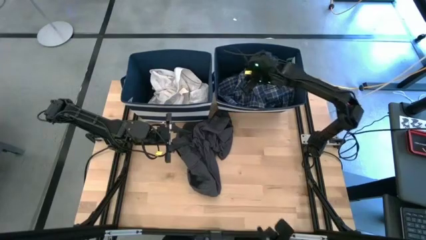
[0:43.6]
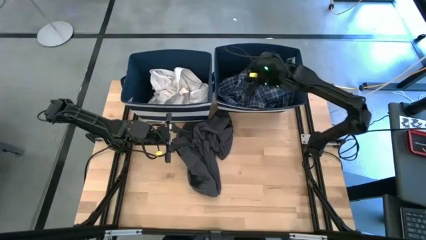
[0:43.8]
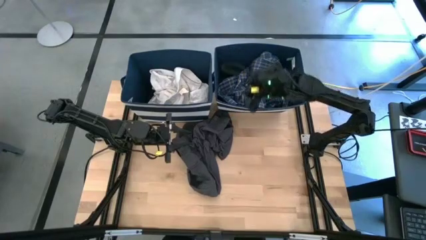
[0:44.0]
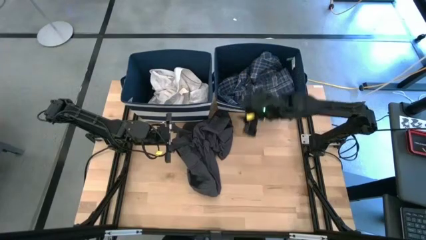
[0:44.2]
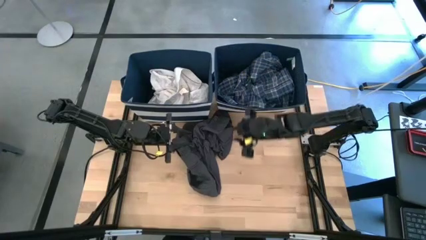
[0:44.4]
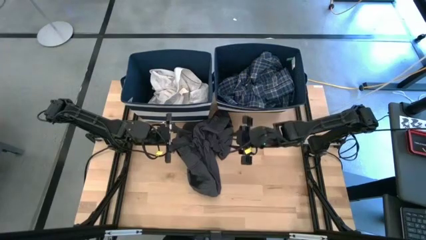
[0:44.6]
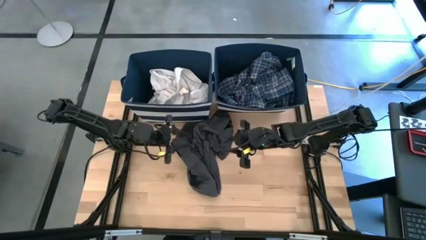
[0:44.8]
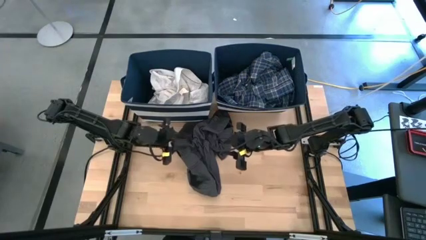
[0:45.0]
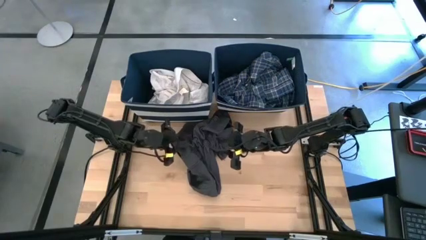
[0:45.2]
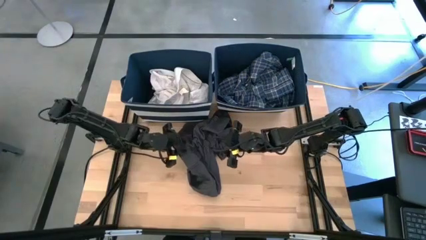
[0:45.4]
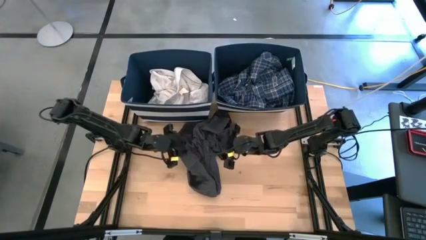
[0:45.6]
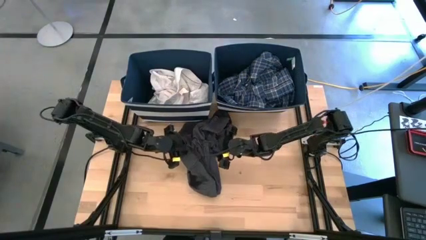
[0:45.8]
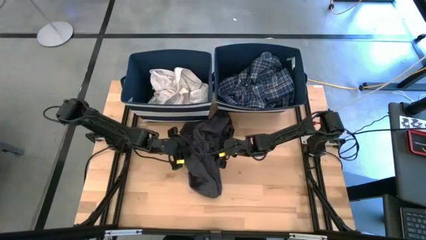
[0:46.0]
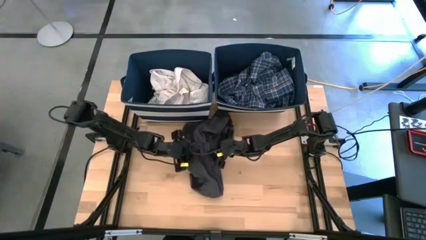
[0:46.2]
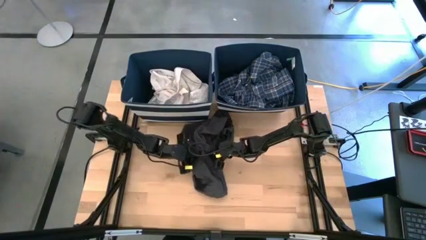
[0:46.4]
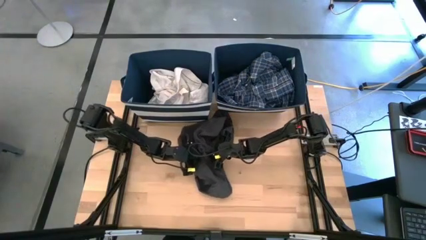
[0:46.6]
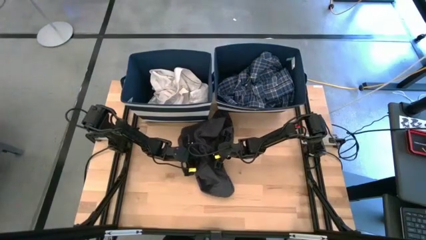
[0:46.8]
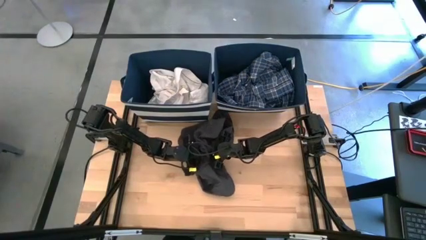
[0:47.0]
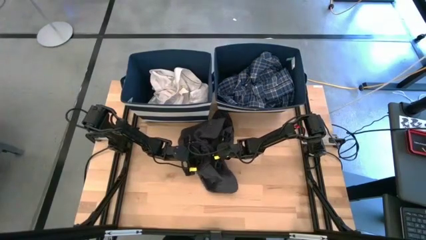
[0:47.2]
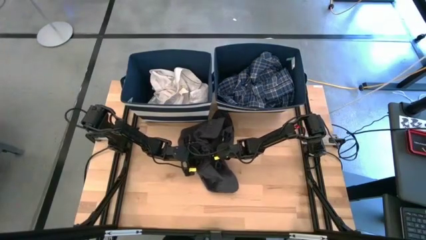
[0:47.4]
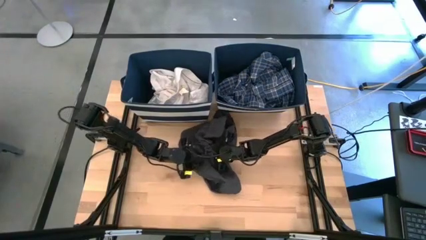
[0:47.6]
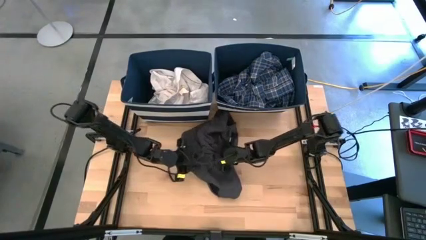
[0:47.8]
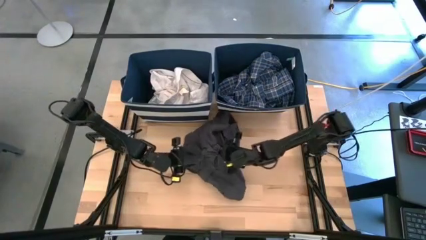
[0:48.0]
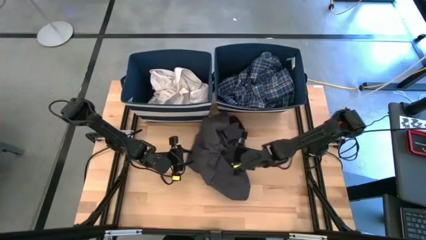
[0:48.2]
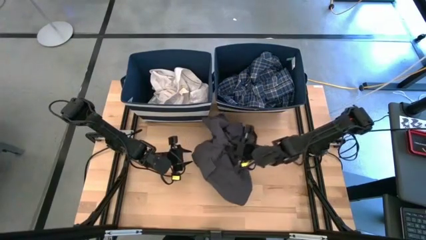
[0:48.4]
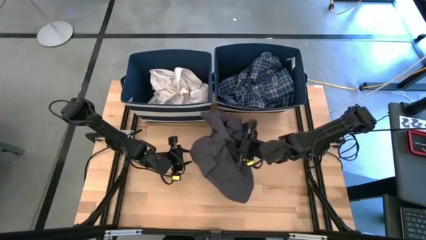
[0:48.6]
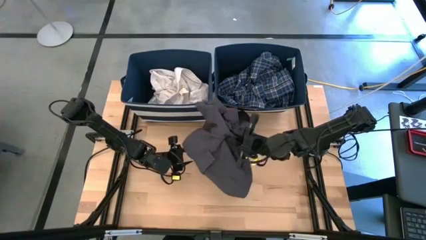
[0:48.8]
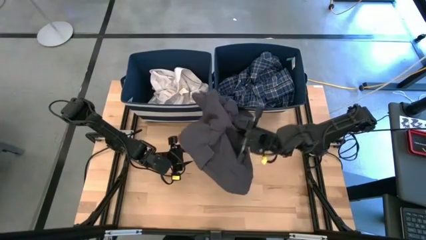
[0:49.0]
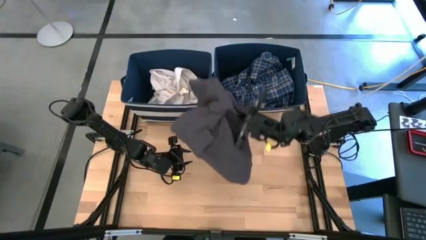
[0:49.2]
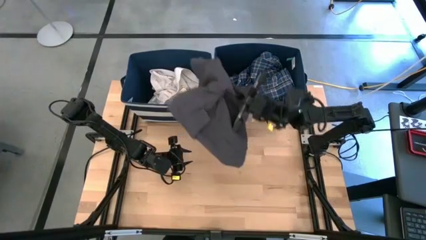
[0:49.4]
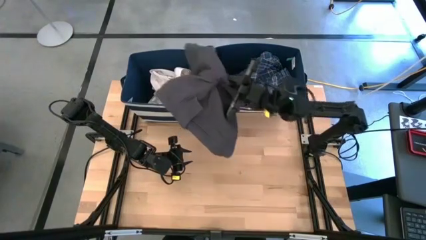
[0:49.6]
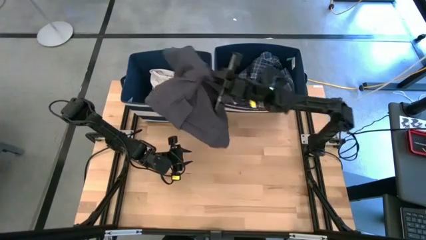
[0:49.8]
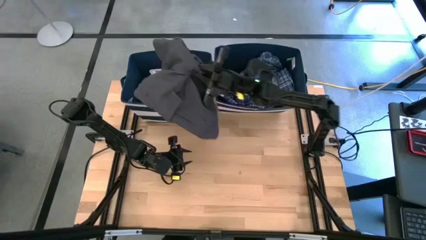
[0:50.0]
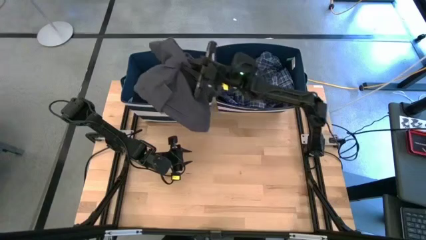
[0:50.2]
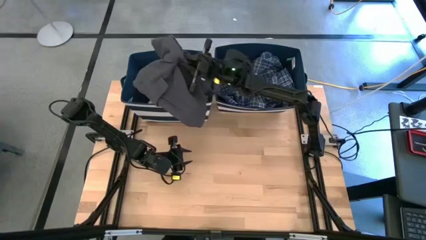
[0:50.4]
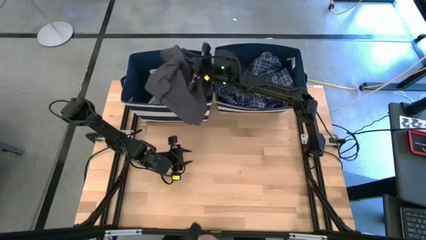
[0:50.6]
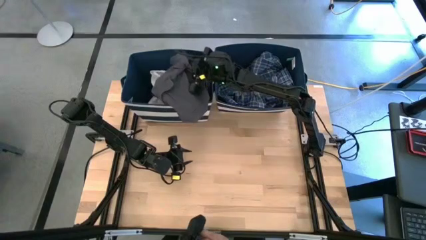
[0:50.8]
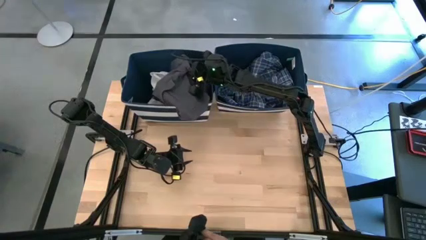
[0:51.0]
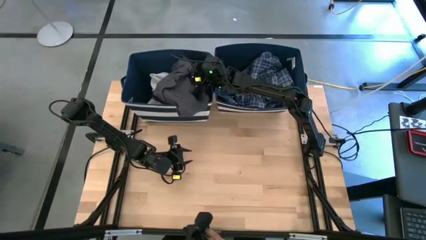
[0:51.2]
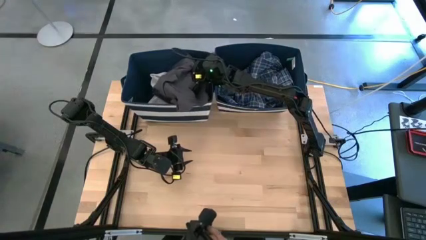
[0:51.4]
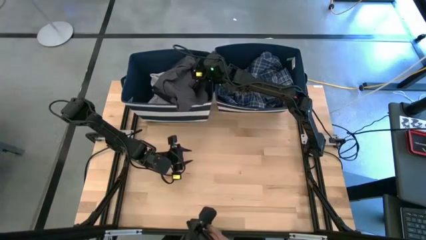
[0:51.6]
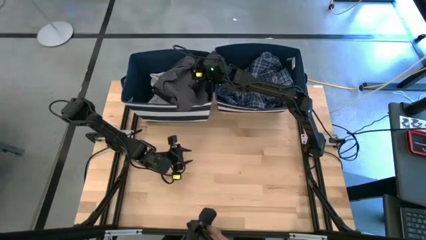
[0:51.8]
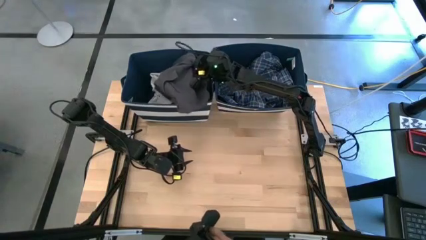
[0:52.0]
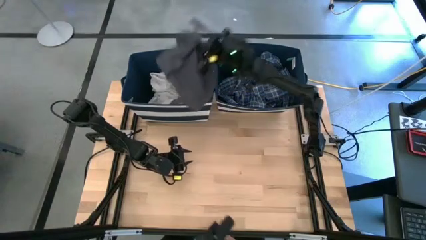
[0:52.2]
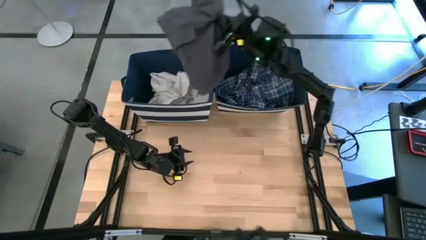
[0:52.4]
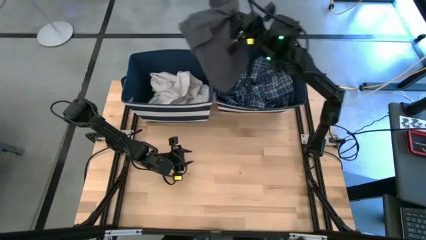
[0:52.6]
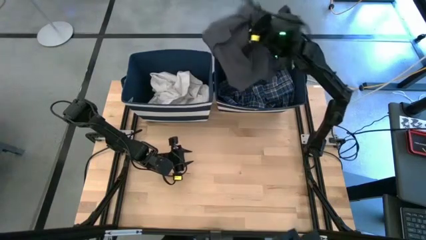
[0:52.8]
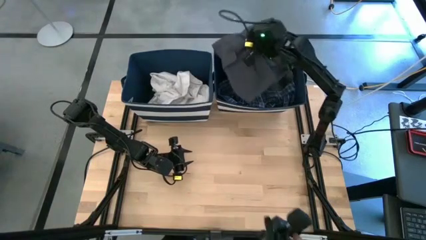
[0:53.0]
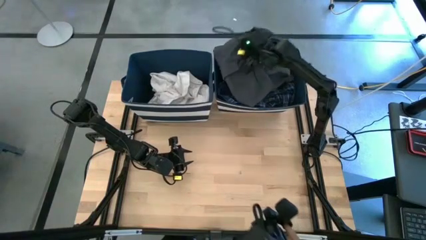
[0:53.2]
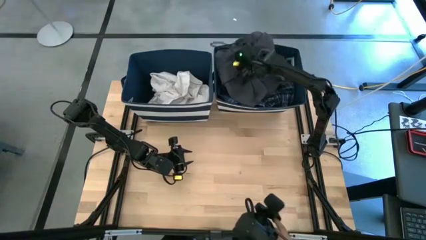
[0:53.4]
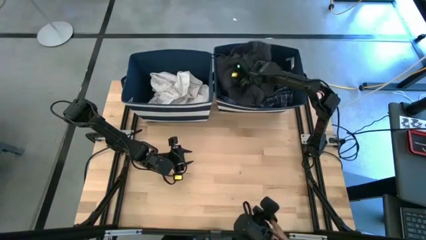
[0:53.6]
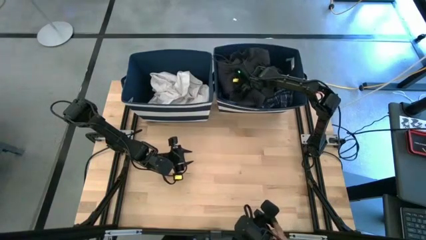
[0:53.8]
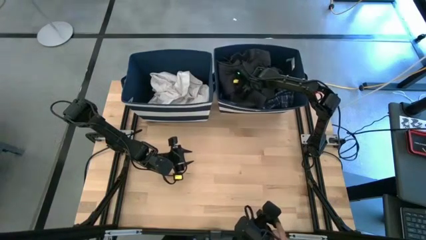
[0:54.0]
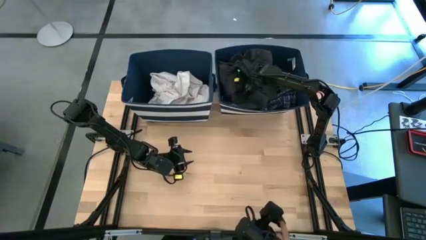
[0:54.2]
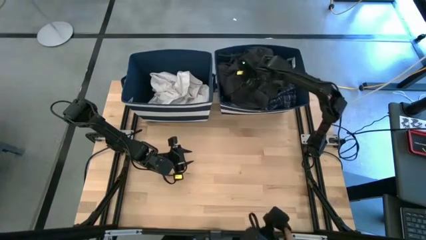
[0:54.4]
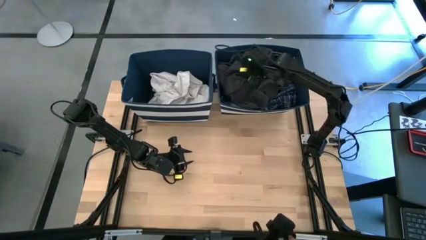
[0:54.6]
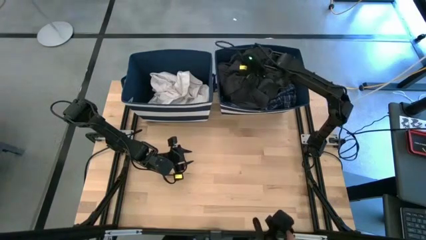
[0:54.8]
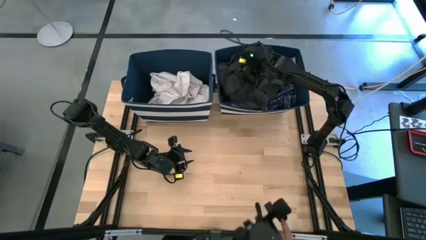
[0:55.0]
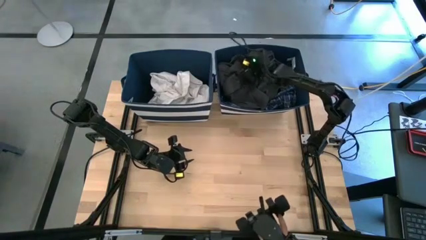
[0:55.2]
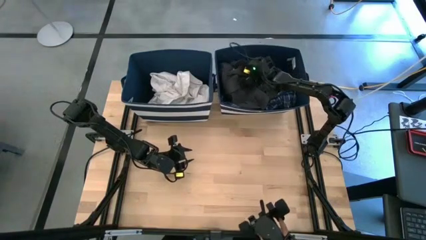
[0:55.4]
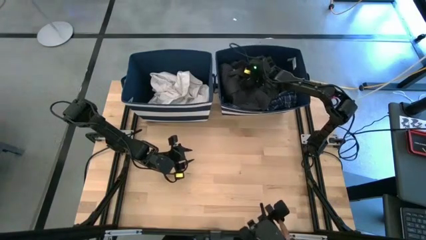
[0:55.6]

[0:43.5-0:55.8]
Task: Sort clothes
Put the dark gray shorts into the right blue laundry basket
